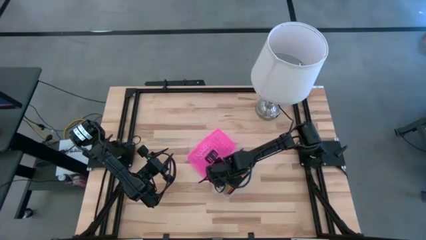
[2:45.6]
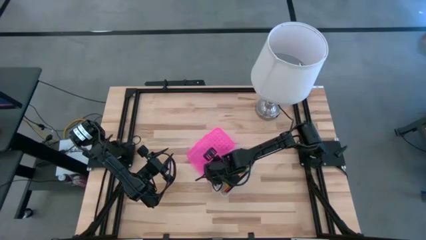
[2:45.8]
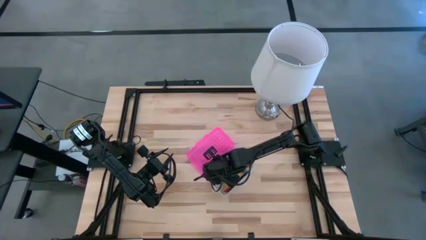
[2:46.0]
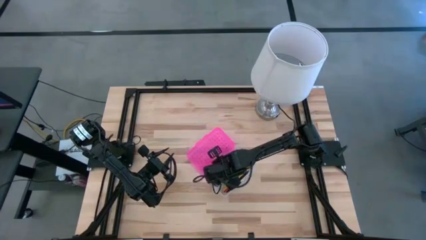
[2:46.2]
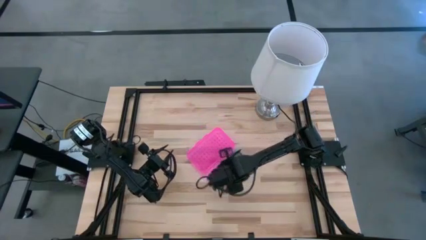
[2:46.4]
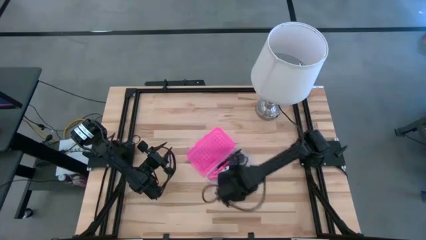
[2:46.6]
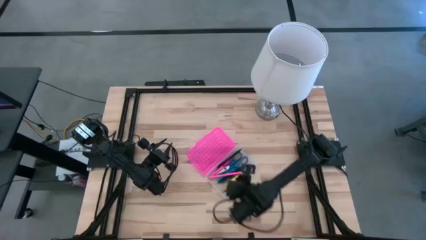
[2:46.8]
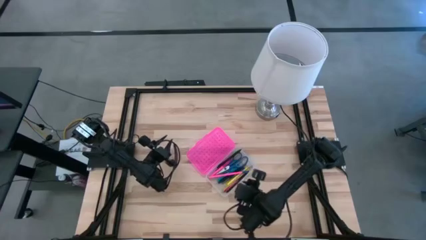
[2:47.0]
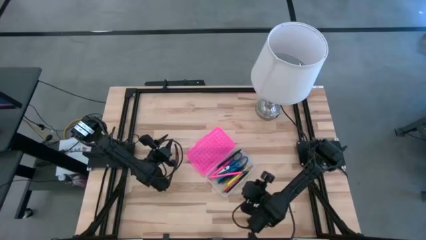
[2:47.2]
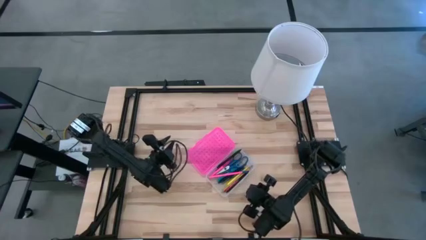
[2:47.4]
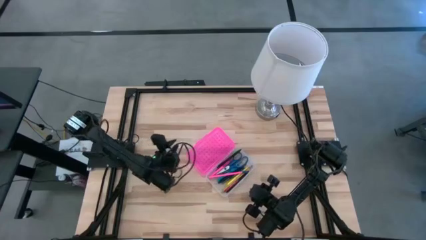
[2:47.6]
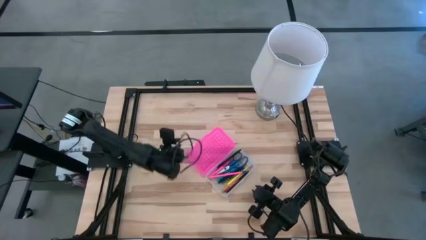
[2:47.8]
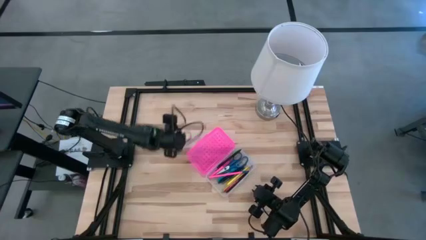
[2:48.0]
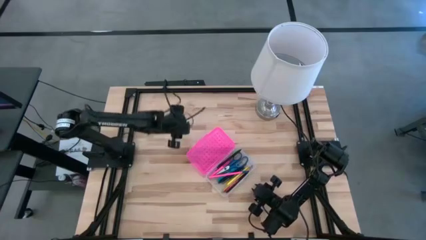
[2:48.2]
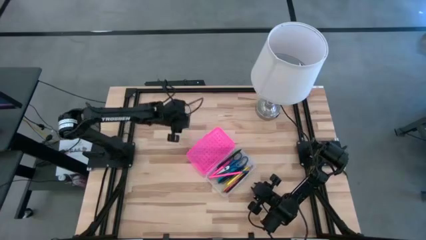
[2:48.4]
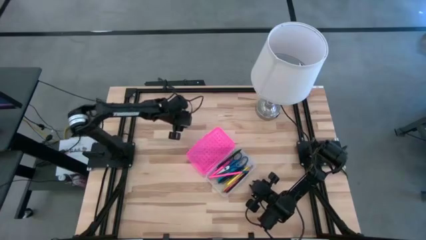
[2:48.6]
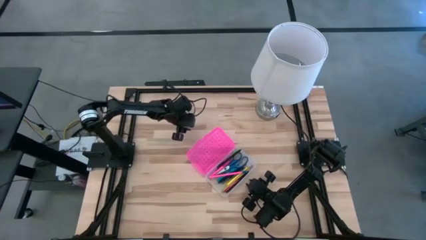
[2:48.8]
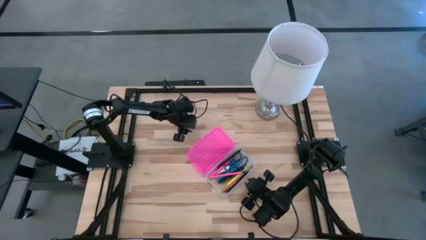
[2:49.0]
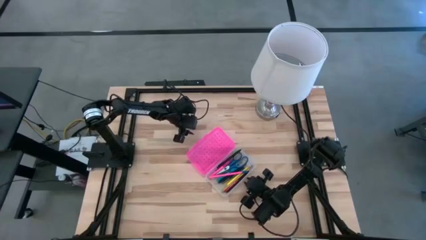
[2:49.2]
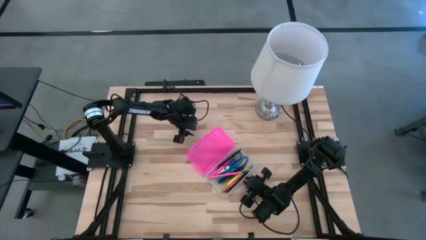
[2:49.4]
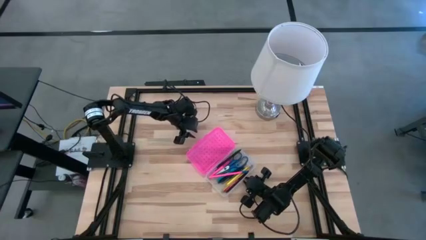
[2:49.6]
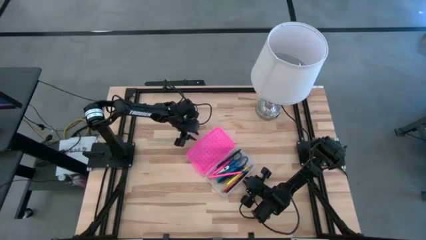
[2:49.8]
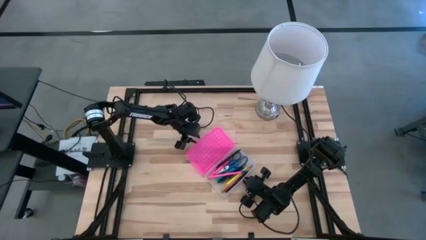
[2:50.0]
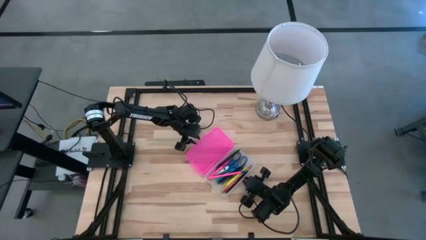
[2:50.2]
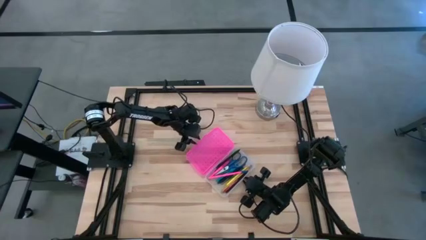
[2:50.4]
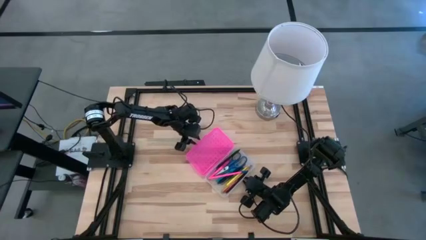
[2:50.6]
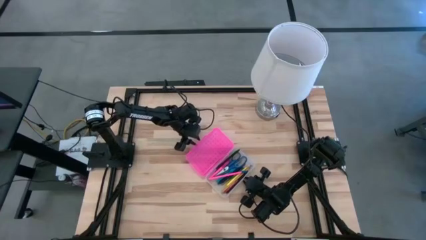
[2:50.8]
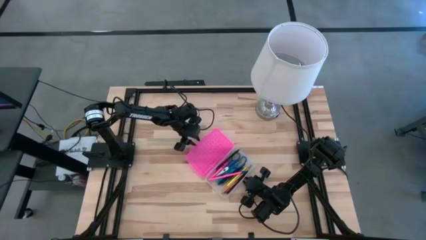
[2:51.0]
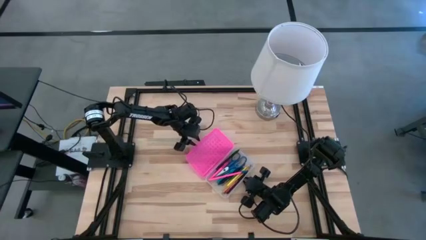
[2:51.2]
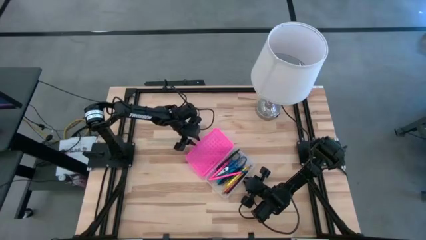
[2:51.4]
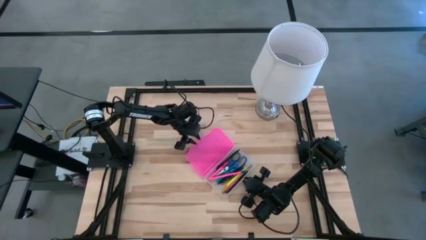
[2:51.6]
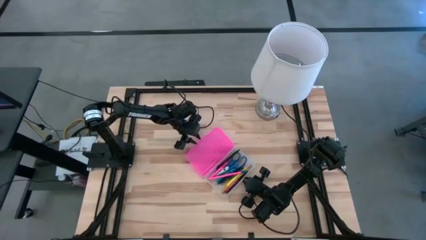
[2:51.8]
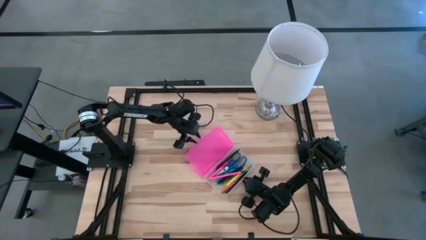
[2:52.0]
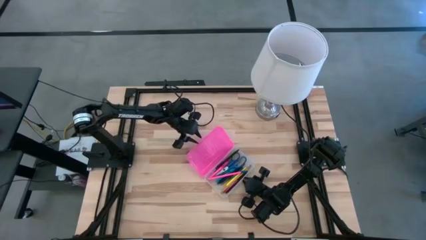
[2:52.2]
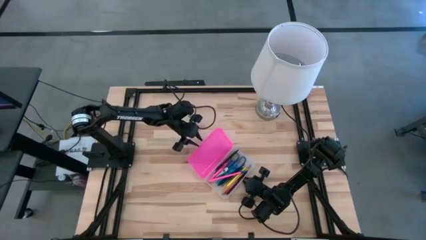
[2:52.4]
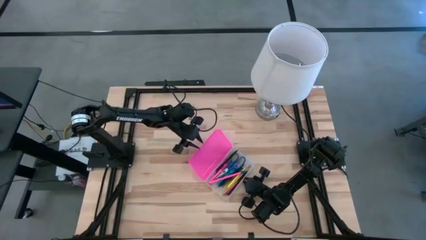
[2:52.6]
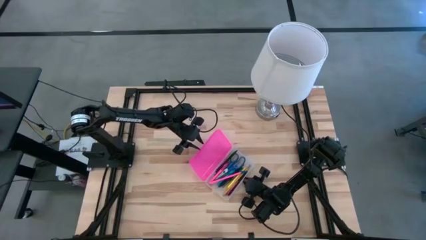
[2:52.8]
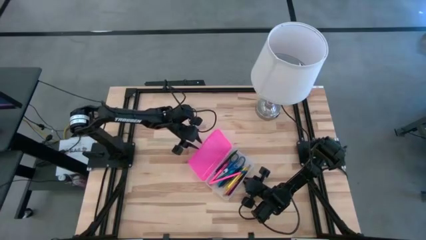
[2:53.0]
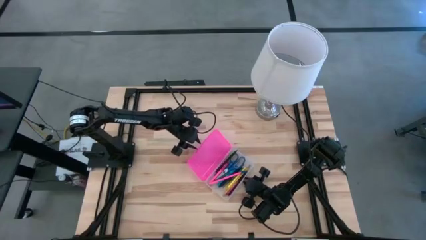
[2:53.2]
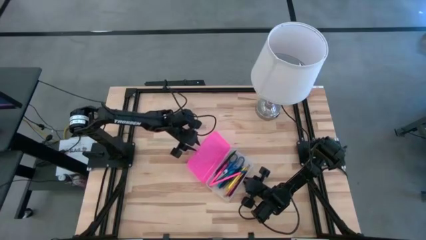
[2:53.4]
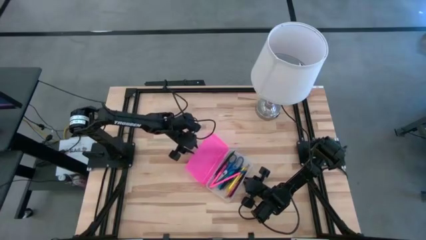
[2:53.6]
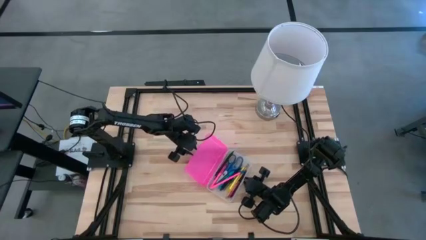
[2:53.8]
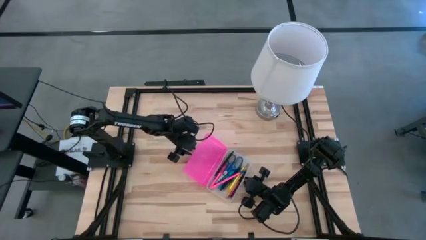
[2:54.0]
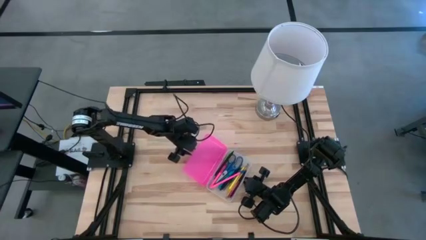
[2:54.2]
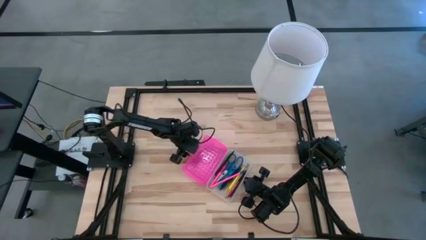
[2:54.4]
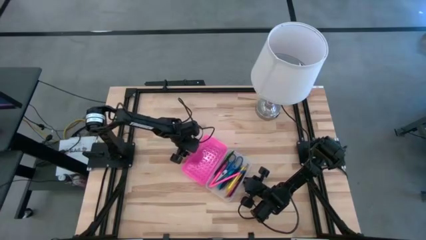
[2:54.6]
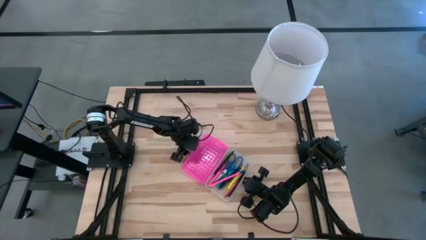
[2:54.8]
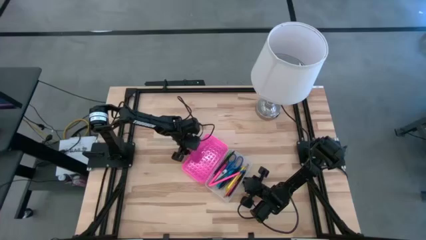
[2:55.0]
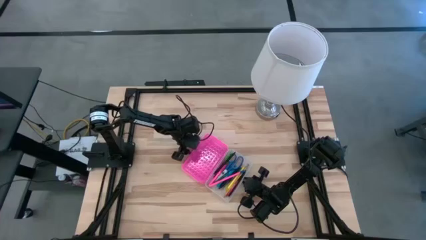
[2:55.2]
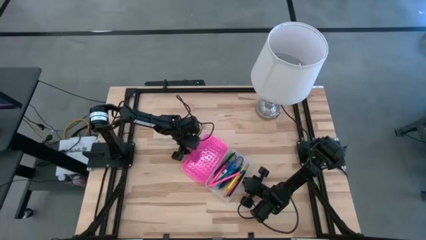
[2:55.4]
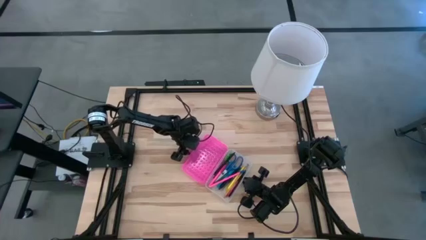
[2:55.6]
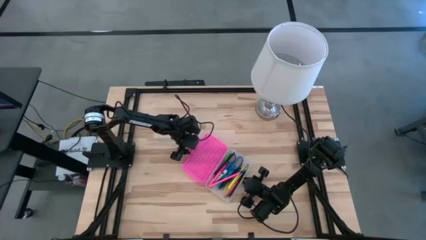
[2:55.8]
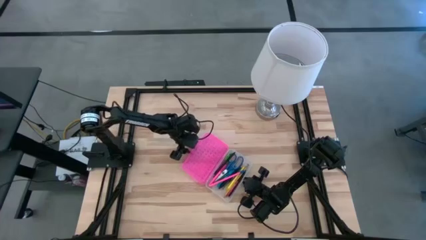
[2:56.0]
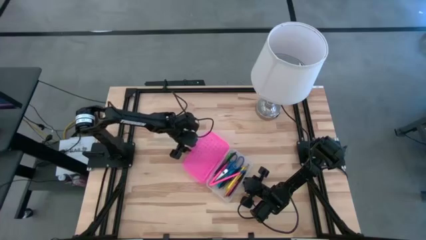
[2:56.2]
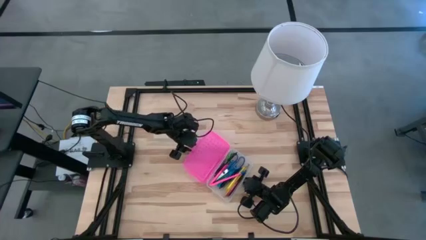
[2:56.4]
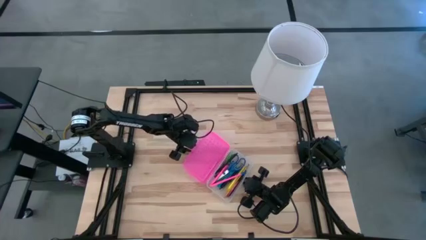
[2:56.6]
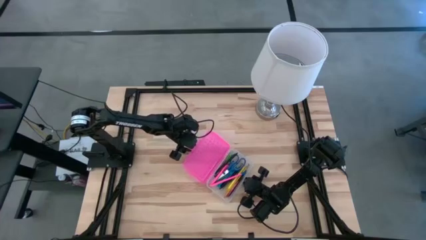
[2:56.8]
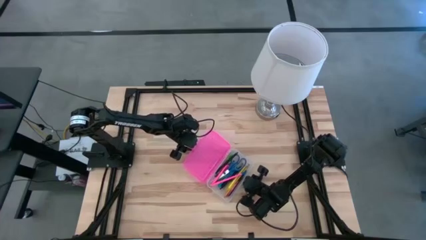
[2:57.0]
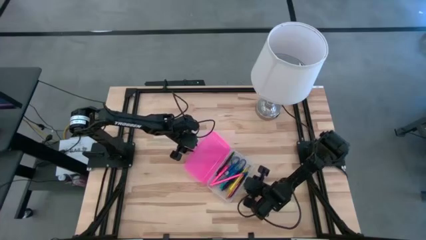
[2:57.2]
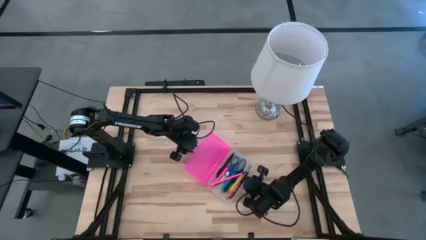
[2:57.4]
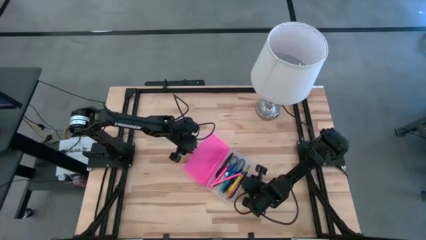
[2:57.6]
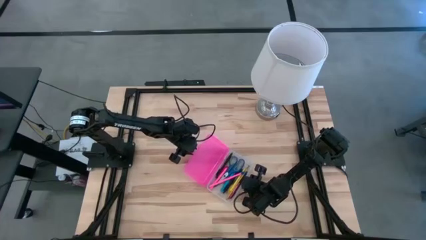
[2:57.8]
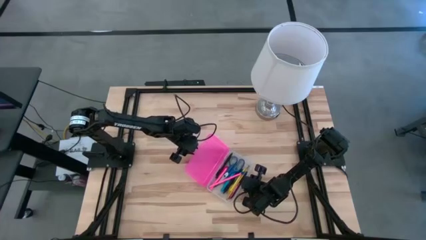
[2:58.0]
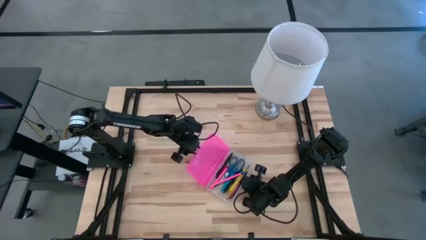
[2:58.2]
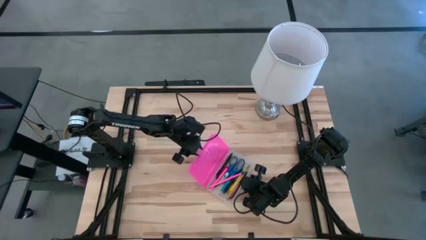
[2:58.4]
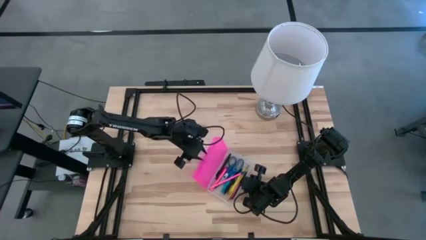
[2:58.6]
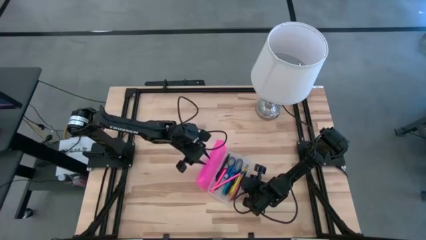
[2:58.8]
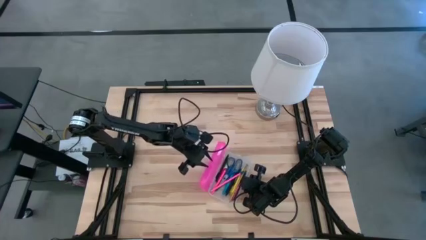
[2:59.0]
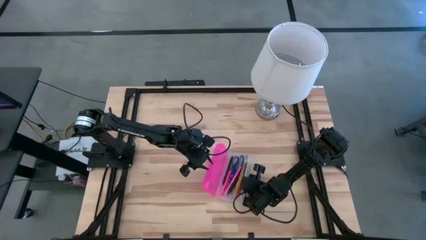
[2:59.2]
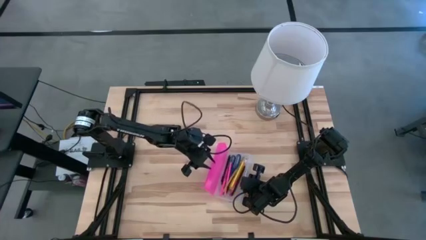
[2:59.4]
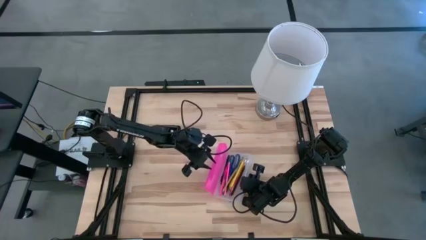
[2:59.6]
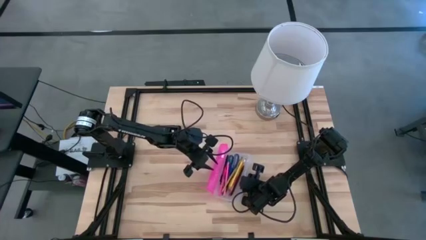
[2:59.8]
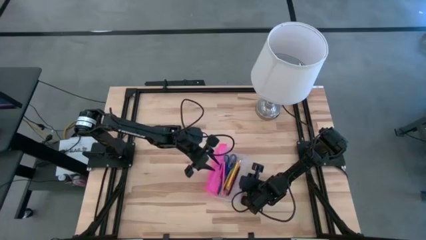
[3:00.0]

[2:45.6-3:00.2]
Task: Pick & place school supplies into a supply box
Close the pink supply box
